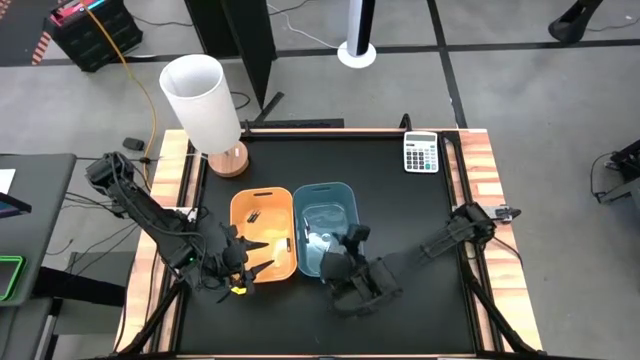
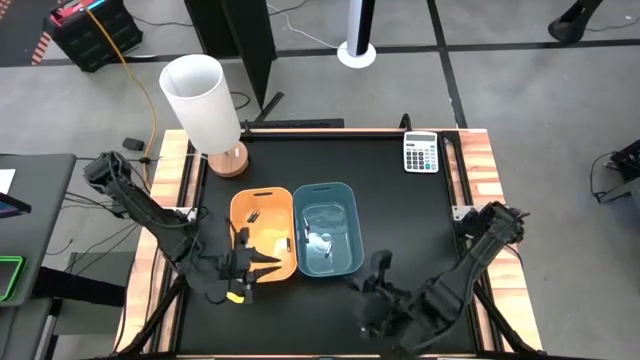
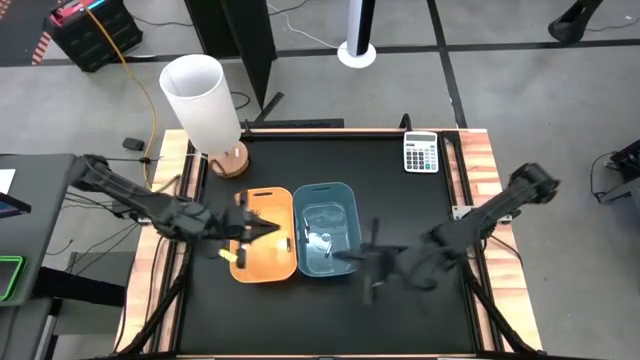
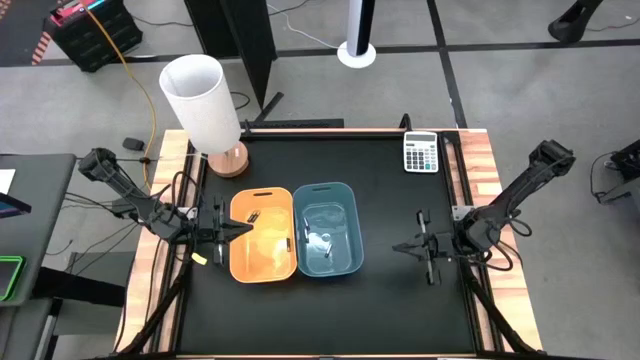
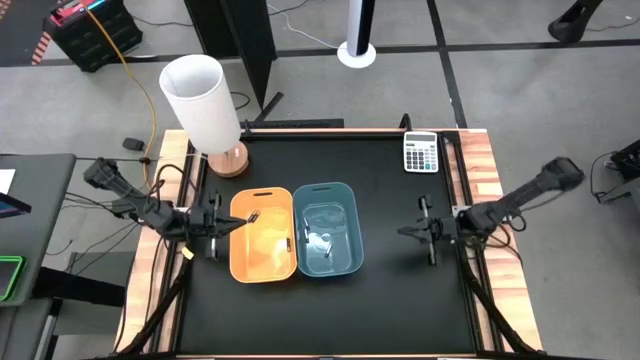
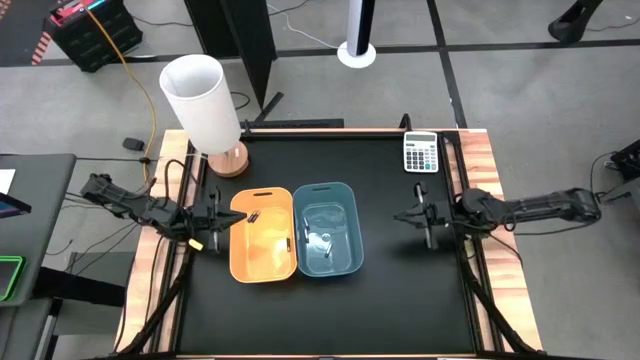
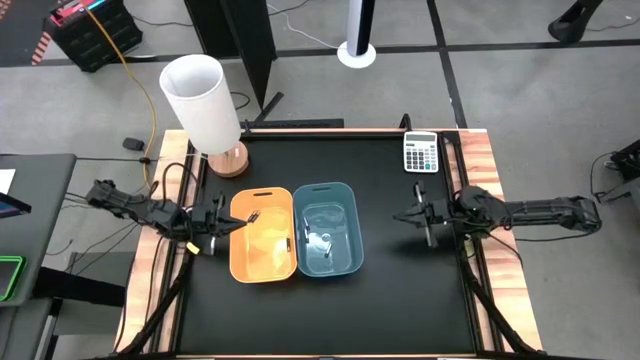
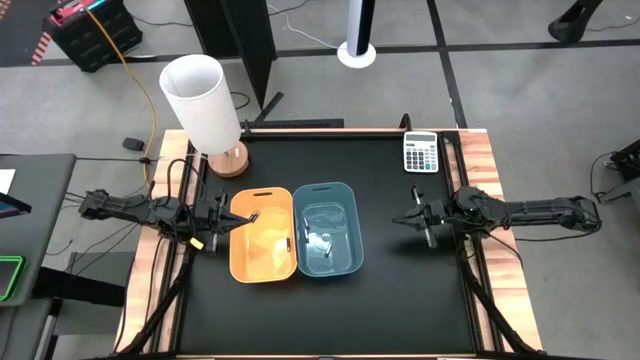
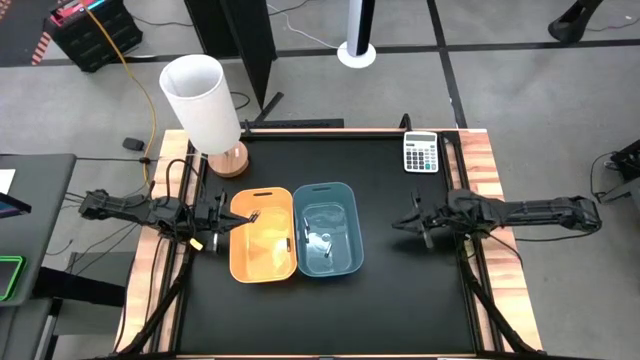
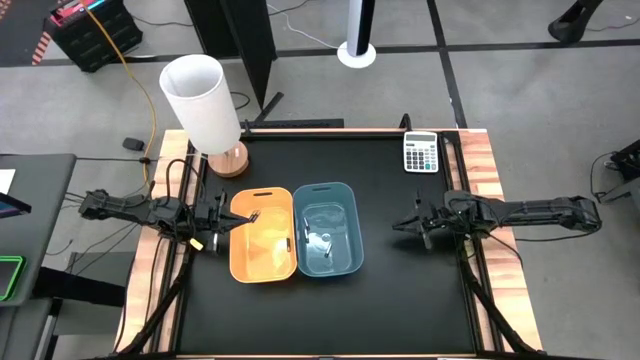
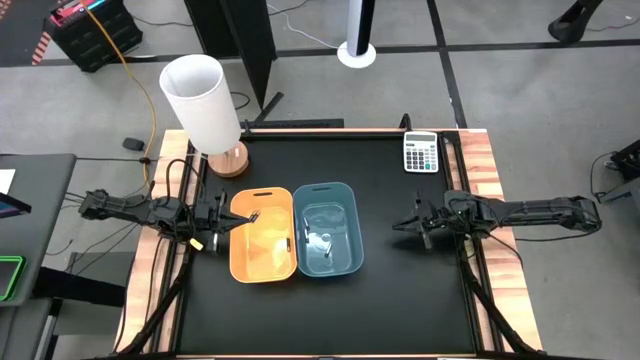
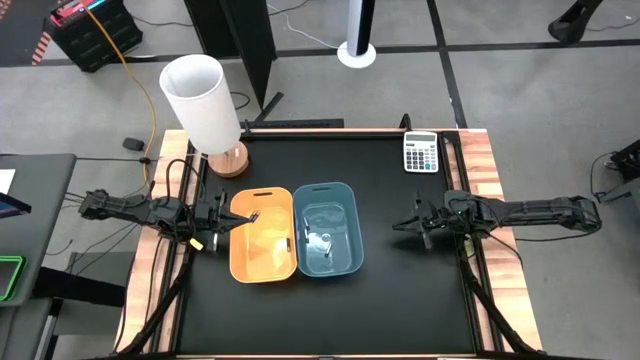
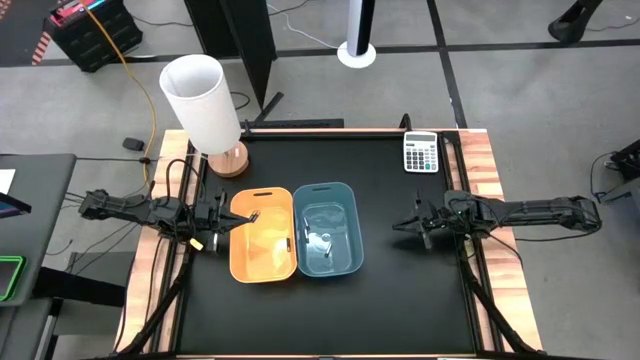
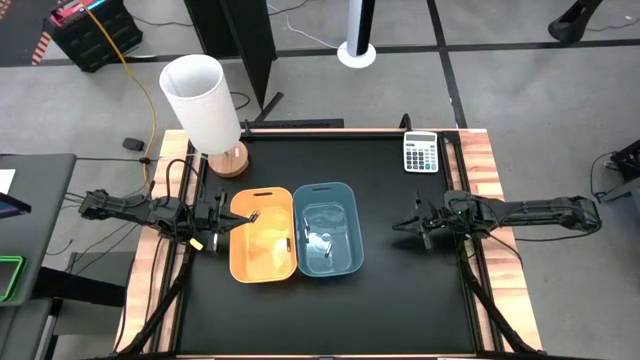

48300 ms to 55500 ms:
Task: Sort batteries
Return to Home Position

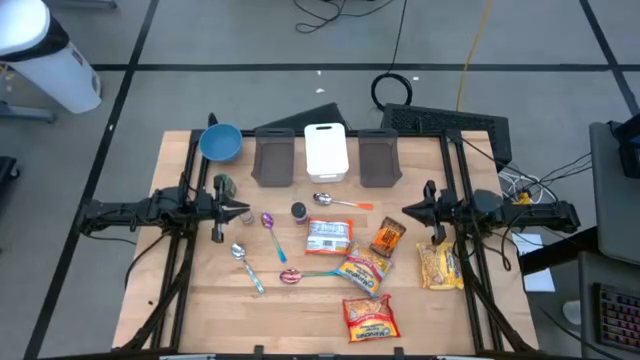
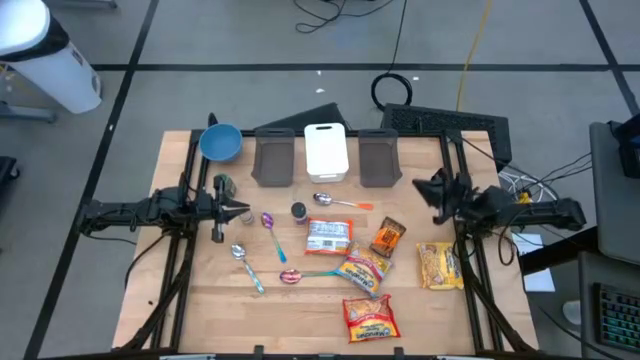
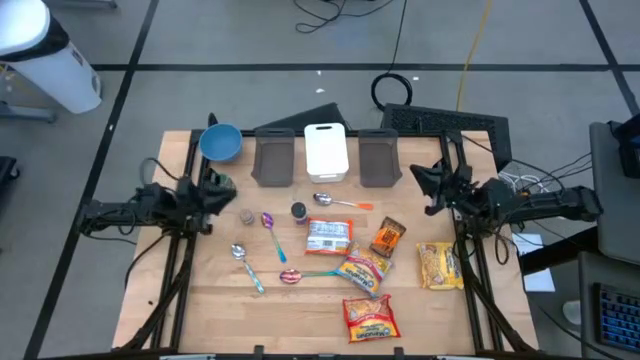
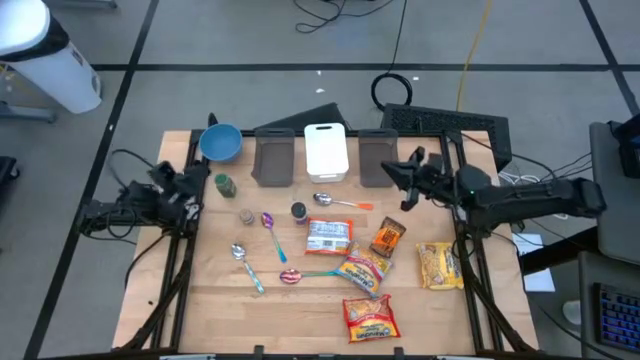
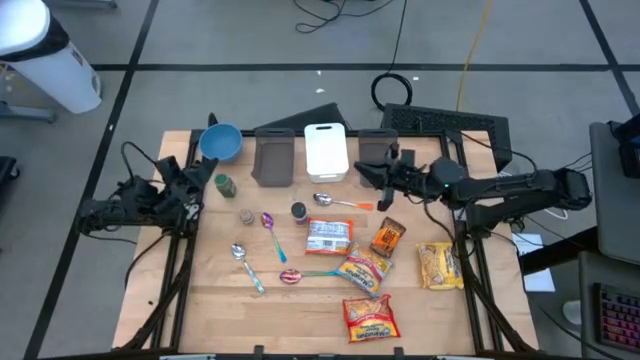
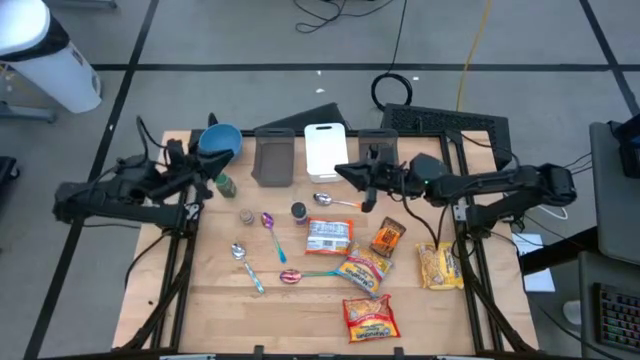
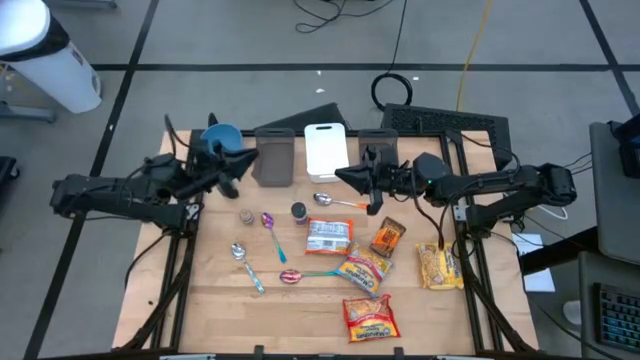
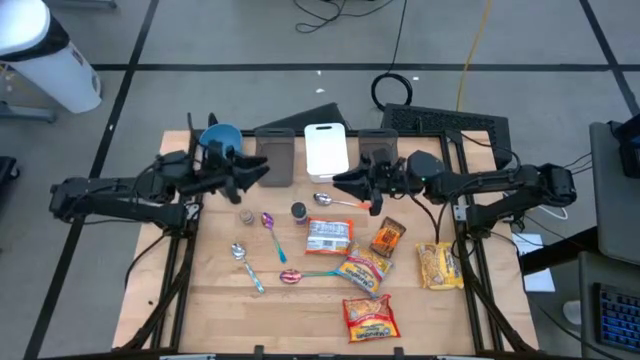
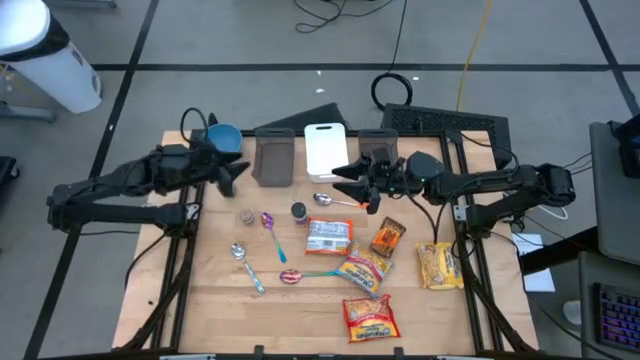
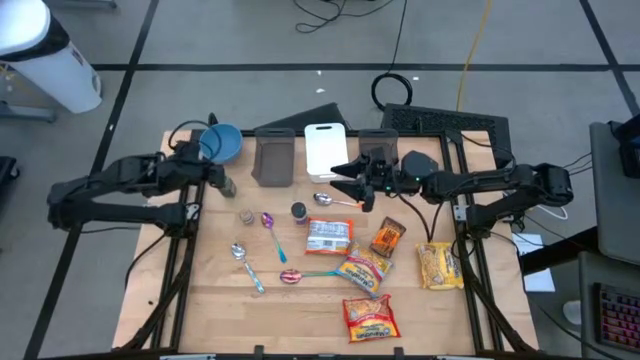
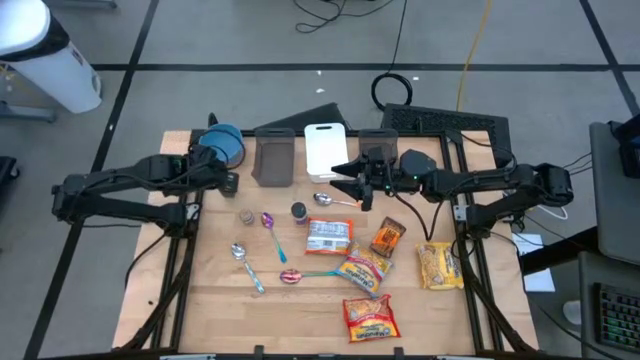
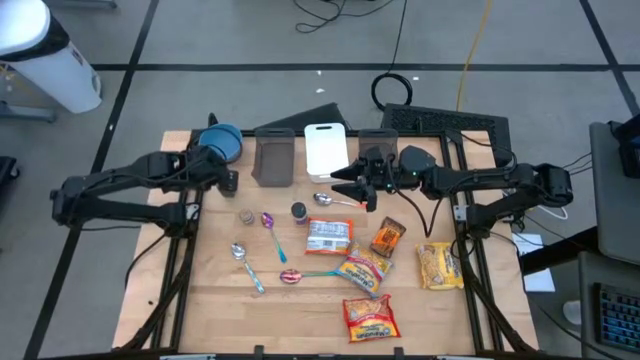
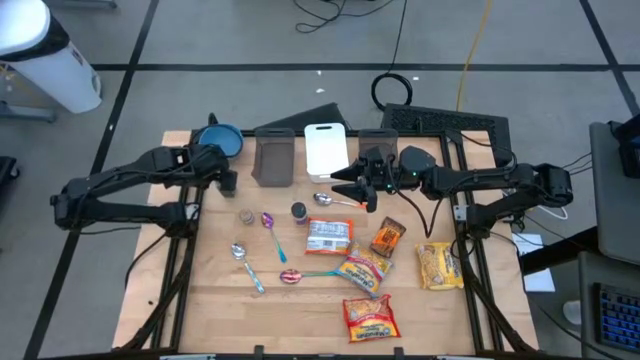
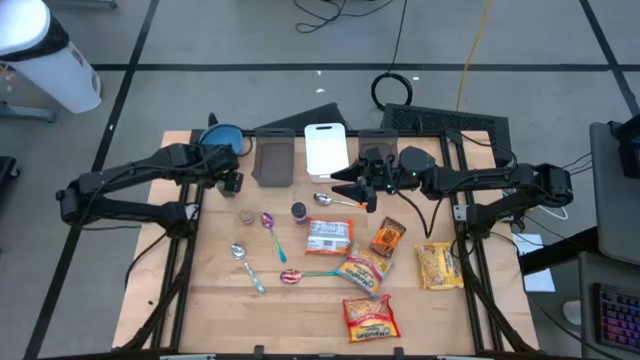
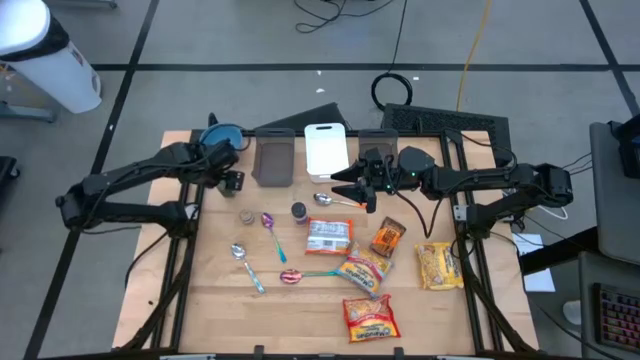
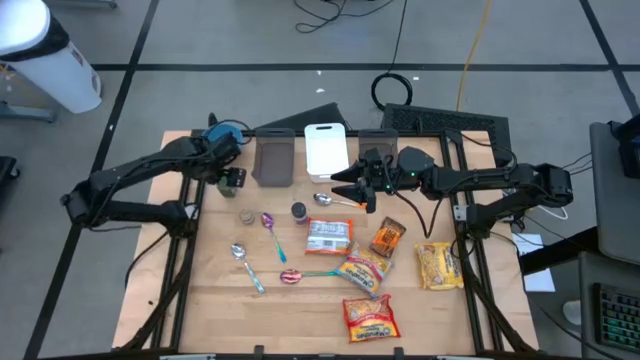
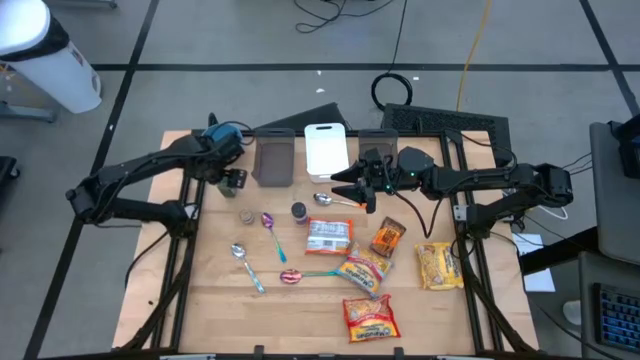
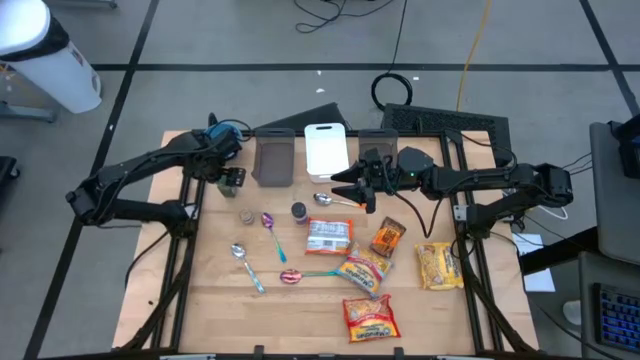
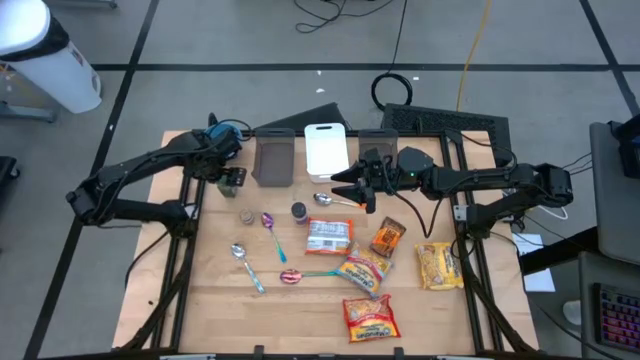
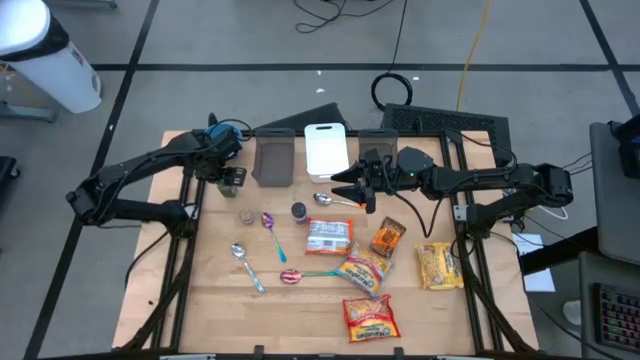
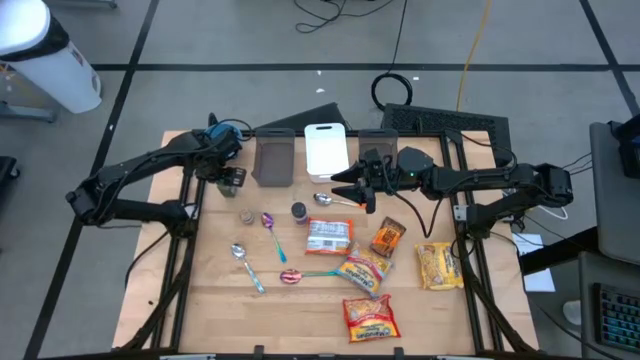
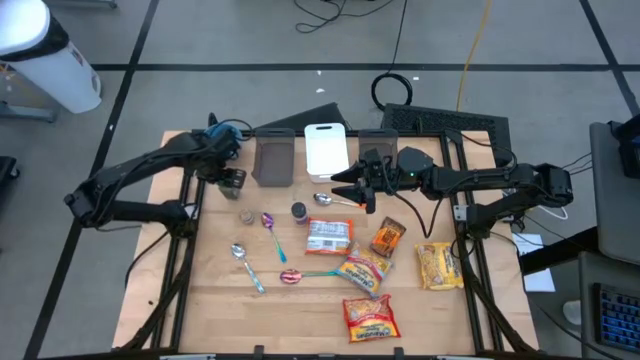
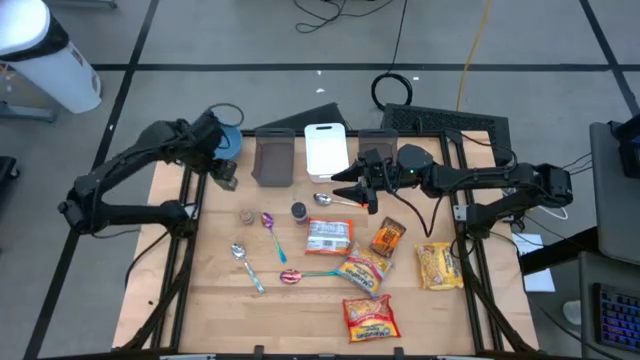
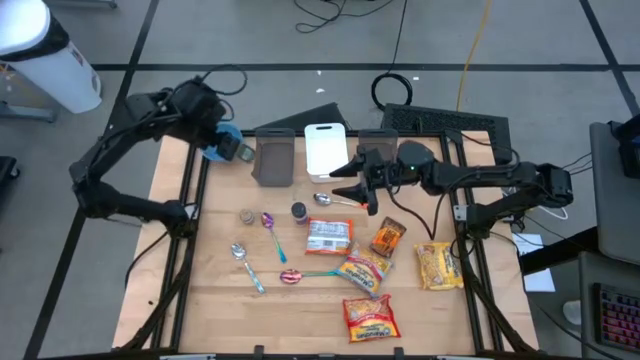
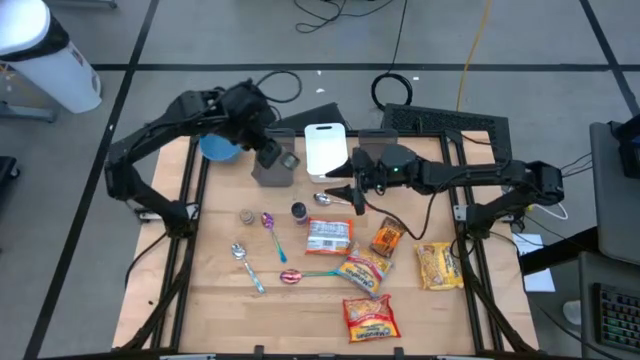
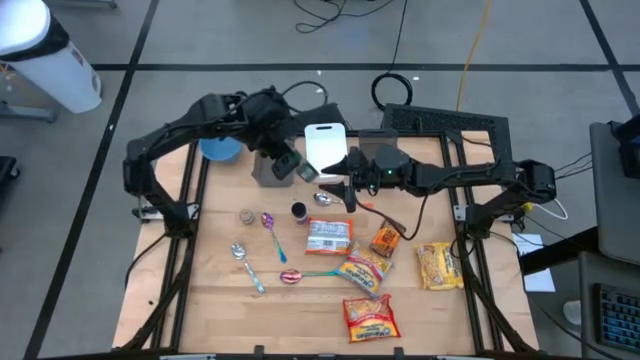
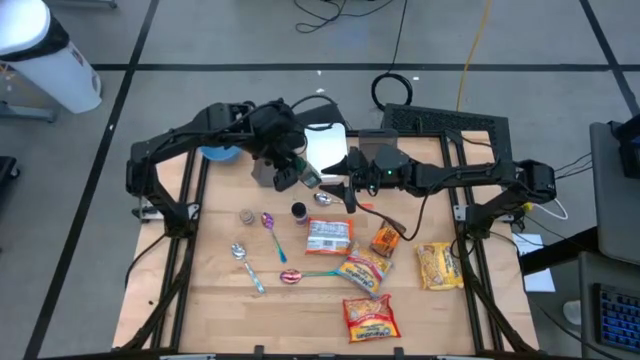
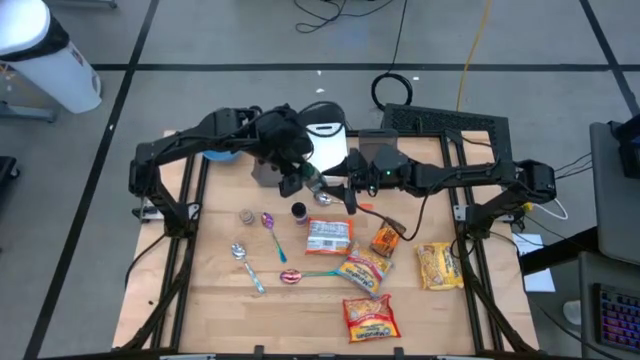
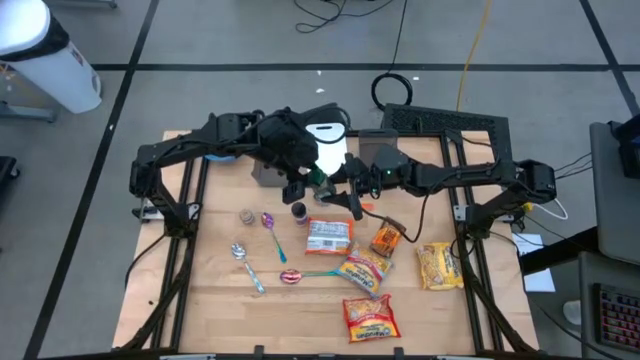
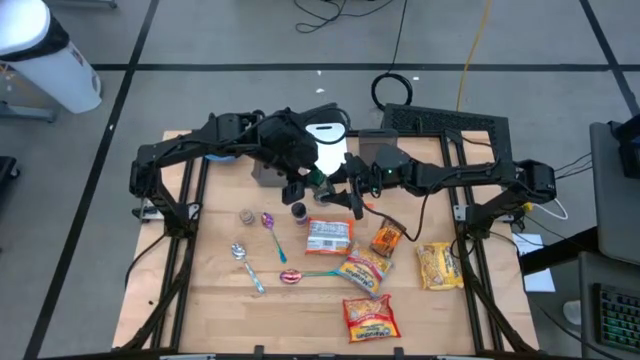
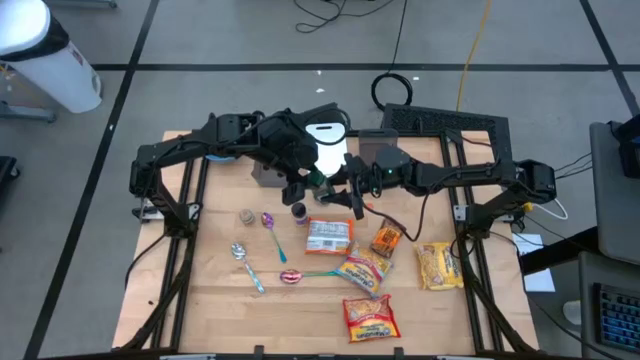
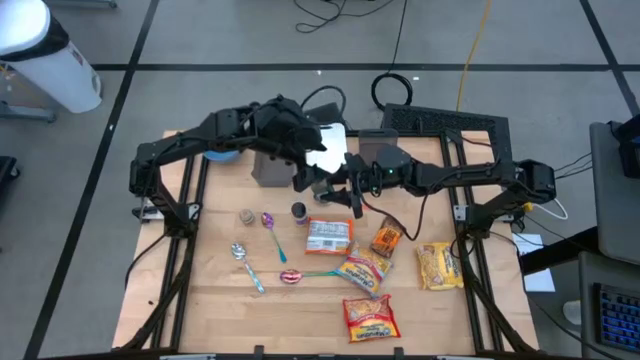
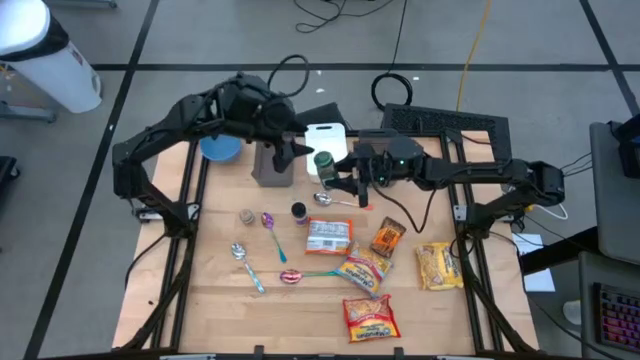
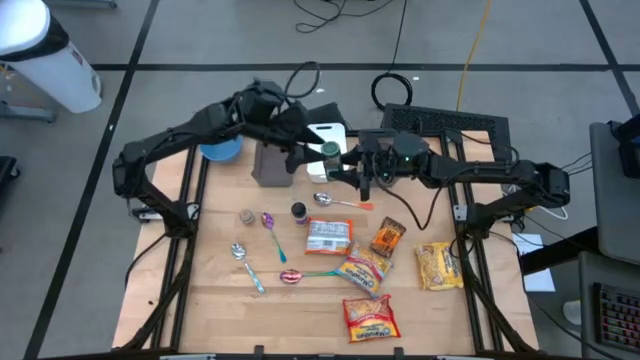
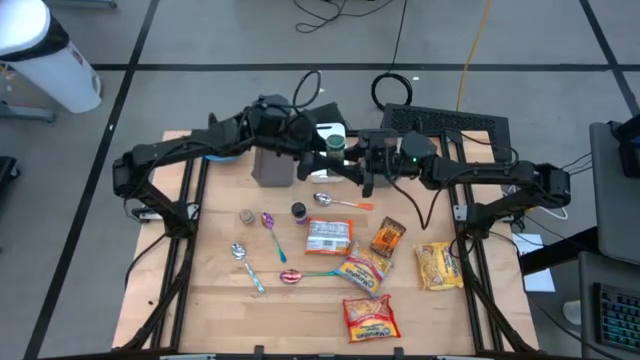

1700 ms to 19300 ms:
Task: Pick & Place Food Item
Put the green seasoning bottle into the white bin
